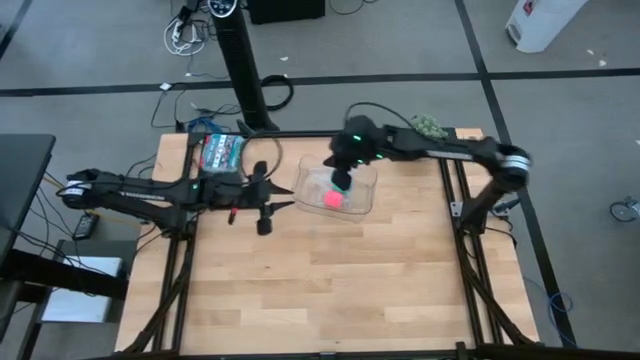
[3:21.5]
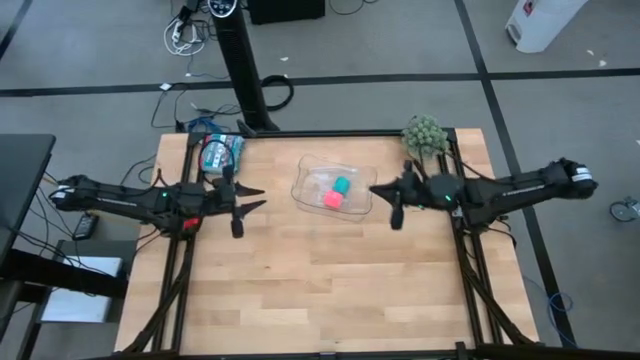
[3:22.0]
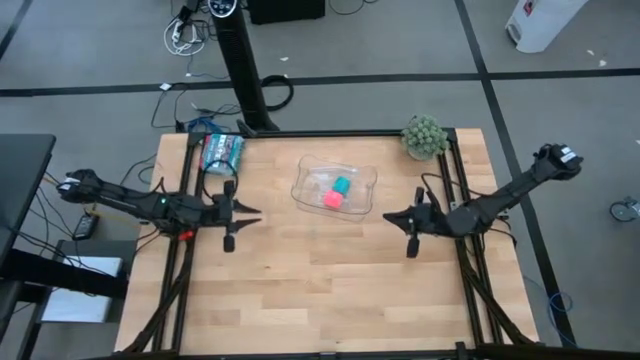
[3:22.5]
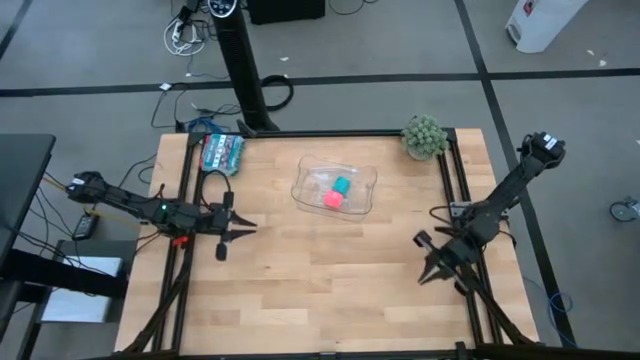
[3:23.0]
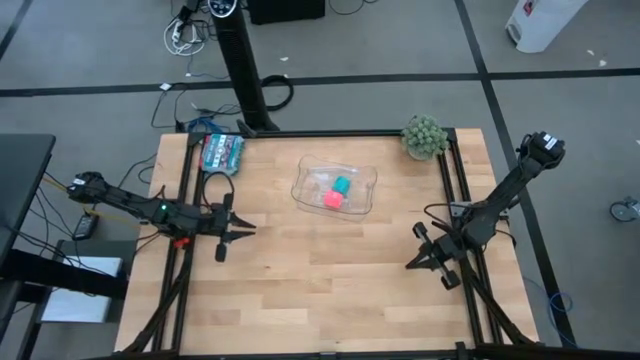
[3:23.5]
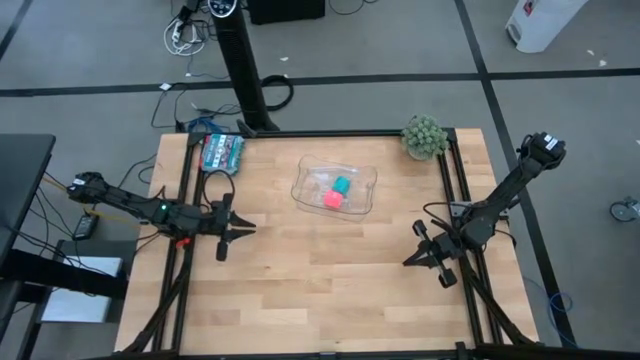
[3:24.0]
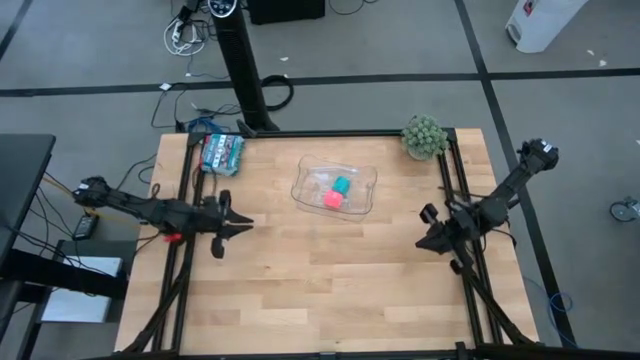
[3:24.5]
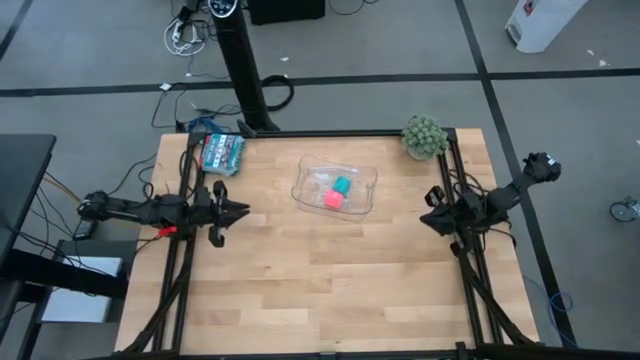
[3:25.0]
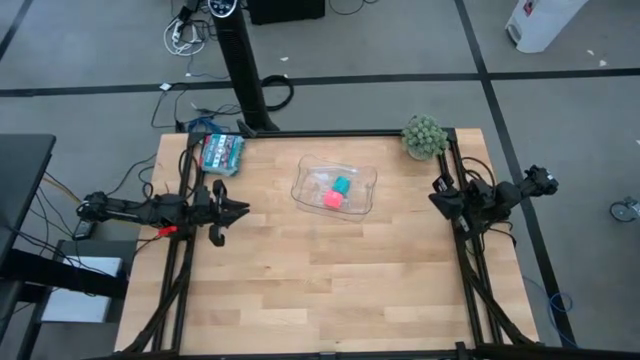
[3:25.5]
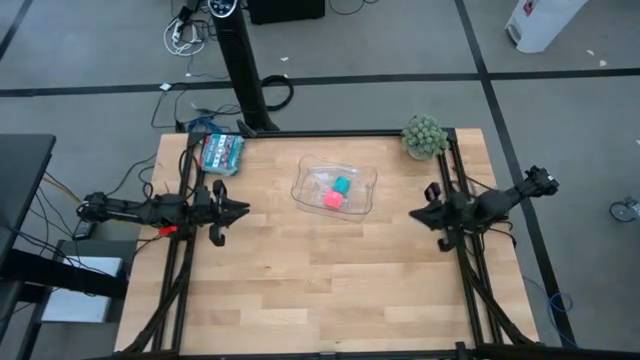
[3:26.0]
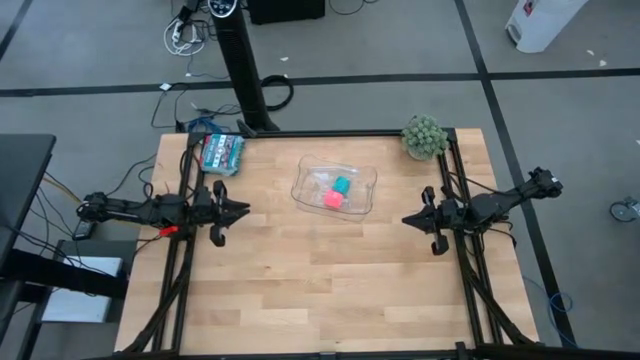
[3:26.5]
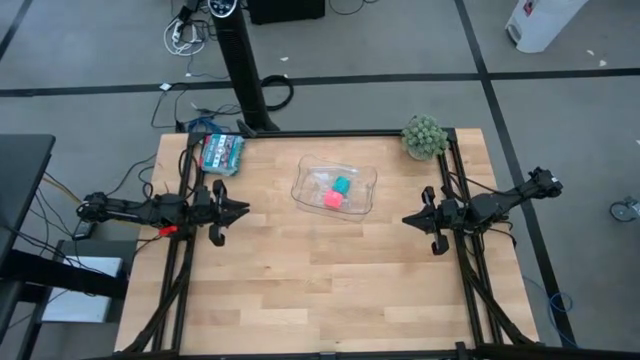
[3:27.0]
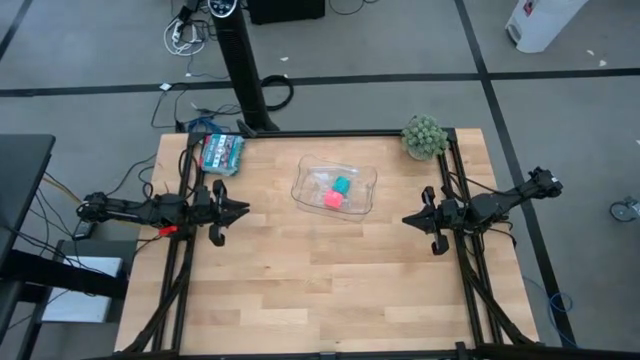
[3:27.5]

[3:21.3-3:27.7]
Task: Roll bandage
Return to Home Position

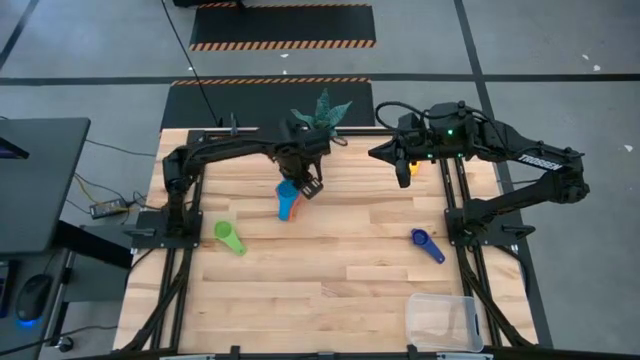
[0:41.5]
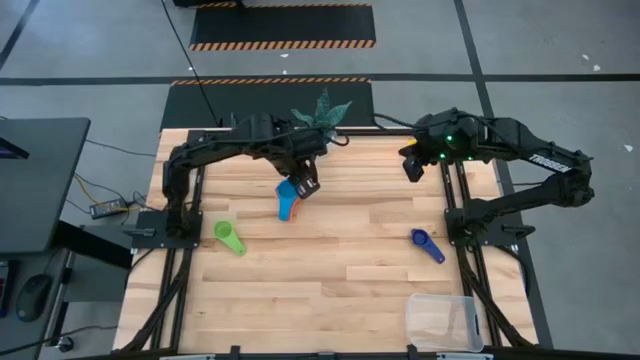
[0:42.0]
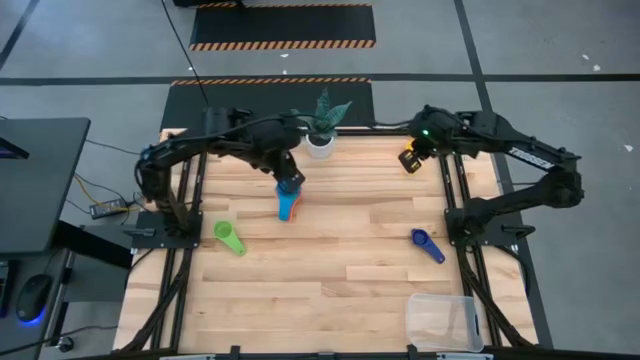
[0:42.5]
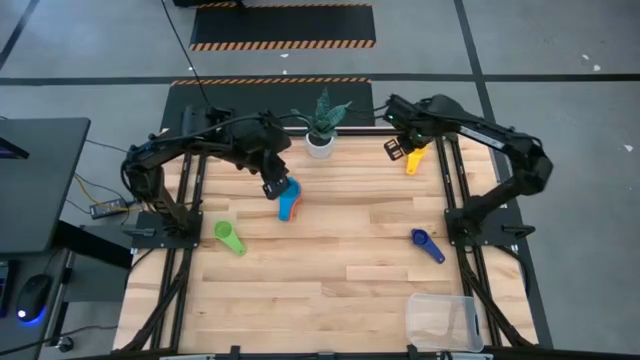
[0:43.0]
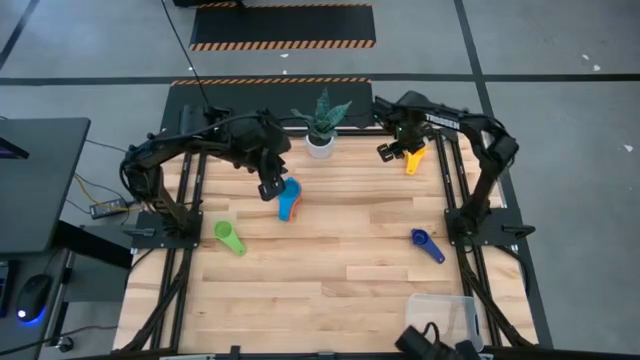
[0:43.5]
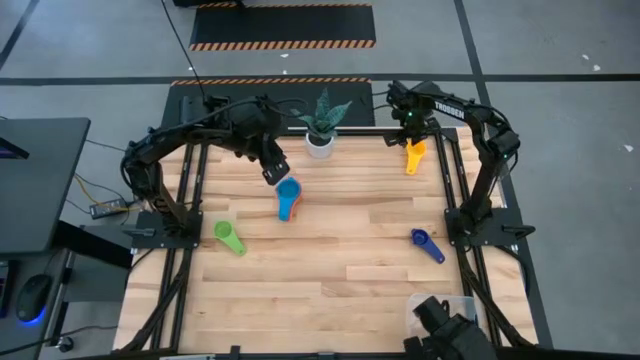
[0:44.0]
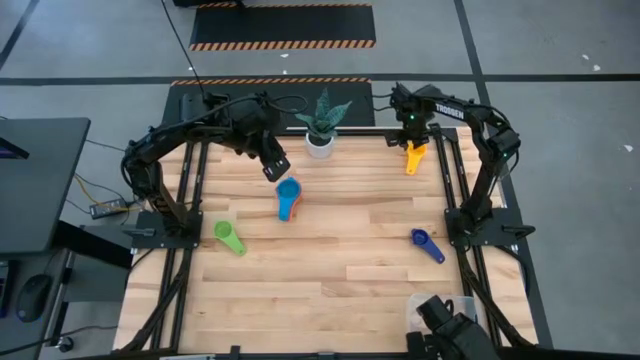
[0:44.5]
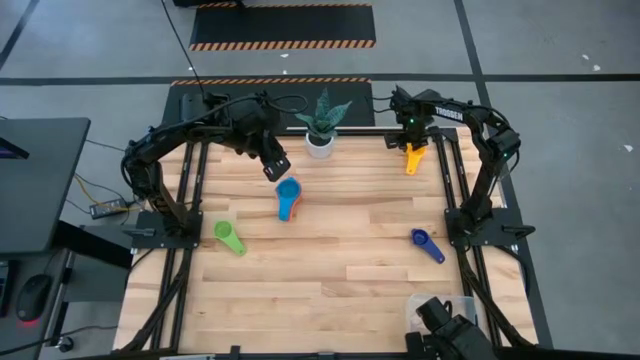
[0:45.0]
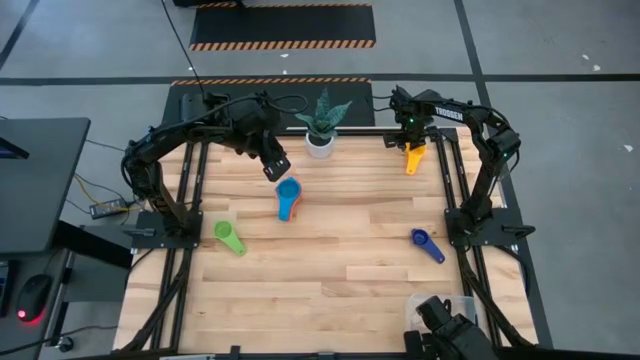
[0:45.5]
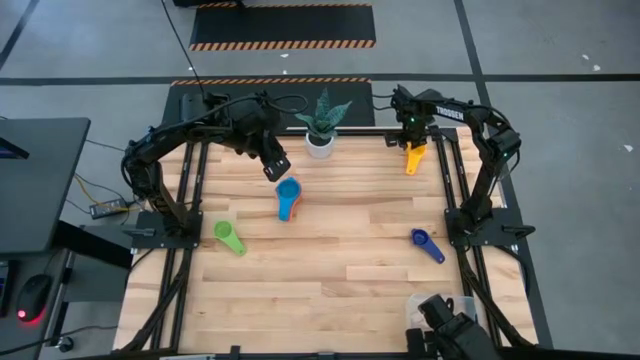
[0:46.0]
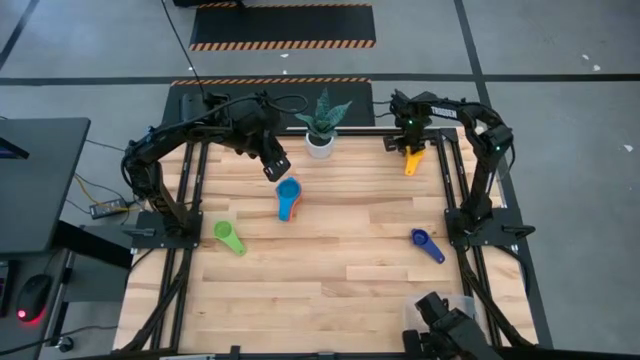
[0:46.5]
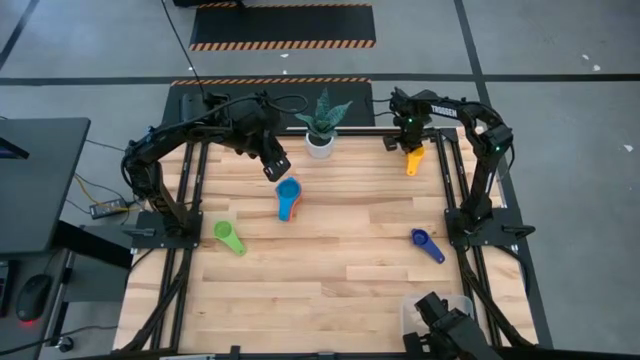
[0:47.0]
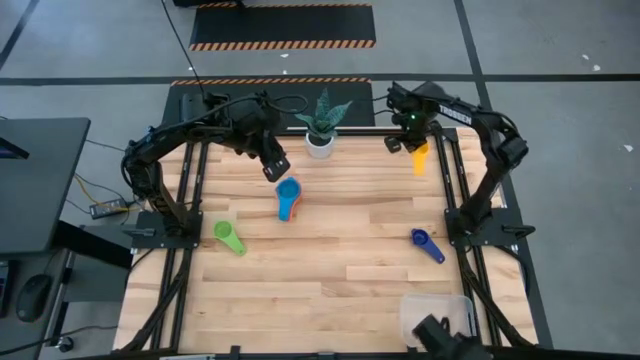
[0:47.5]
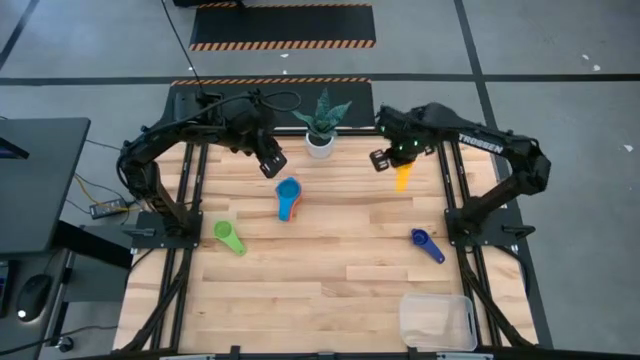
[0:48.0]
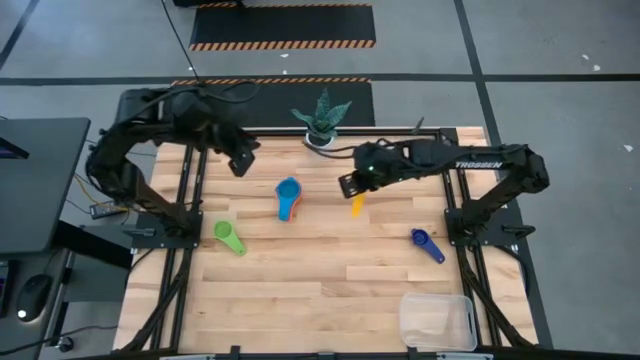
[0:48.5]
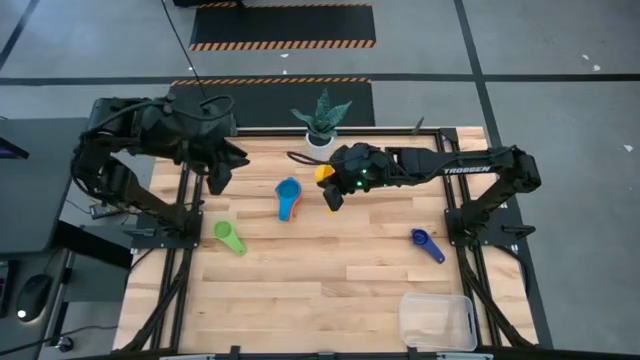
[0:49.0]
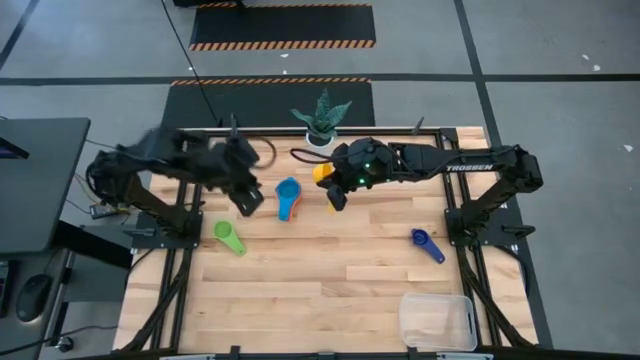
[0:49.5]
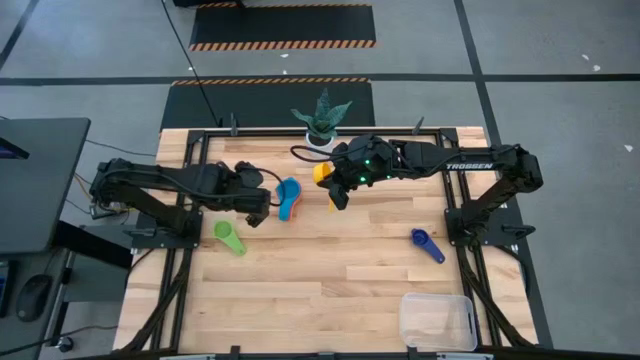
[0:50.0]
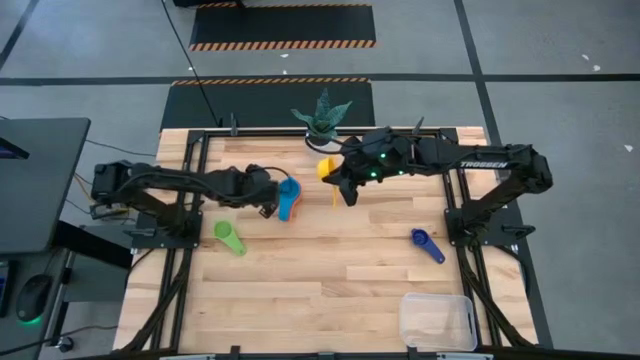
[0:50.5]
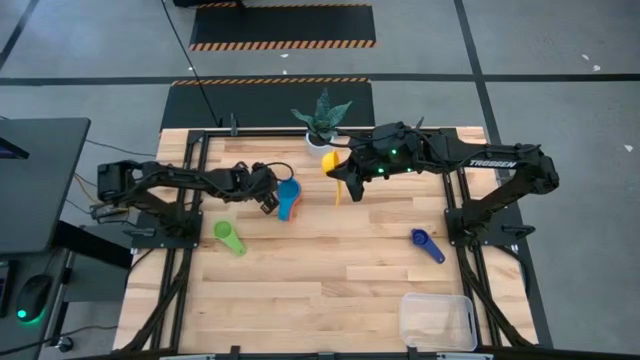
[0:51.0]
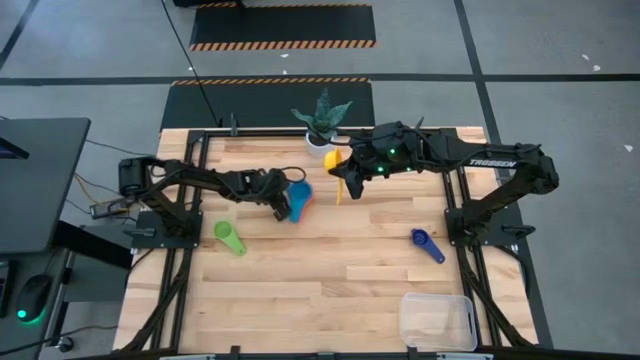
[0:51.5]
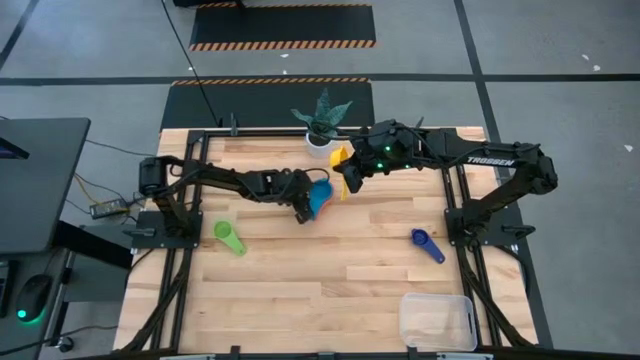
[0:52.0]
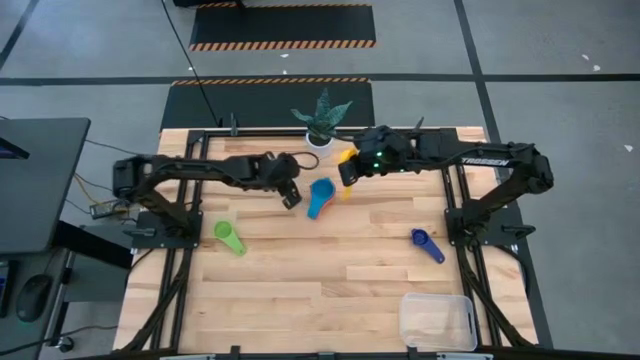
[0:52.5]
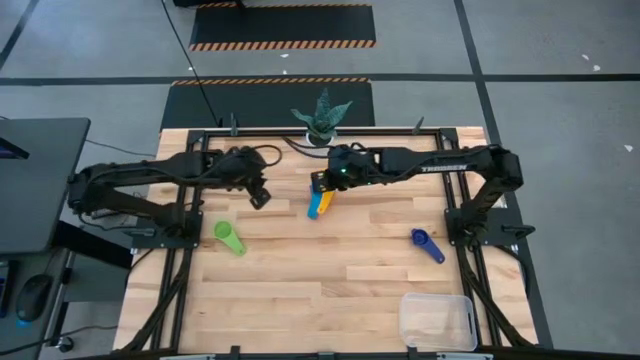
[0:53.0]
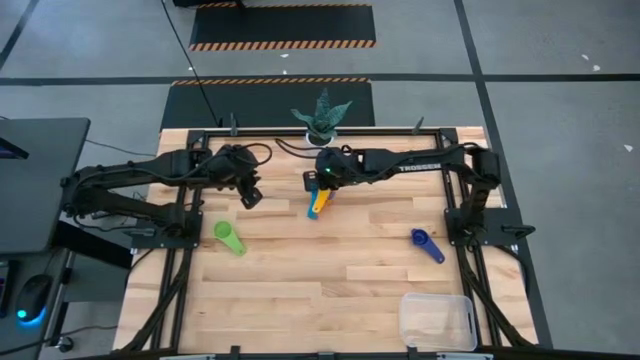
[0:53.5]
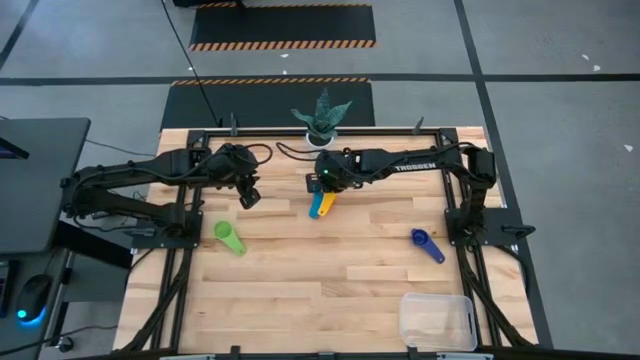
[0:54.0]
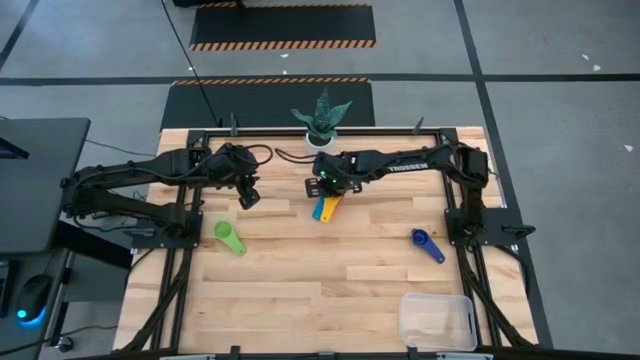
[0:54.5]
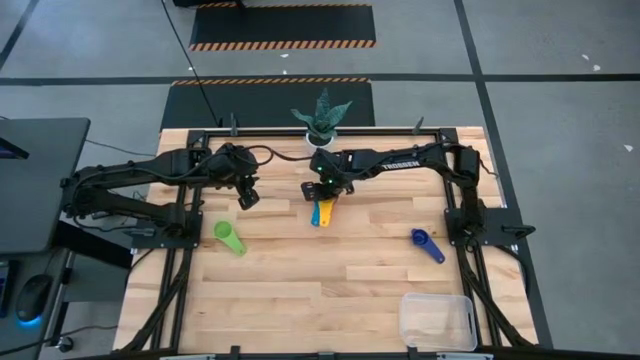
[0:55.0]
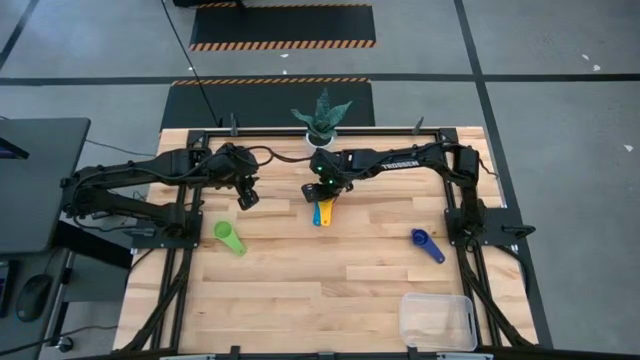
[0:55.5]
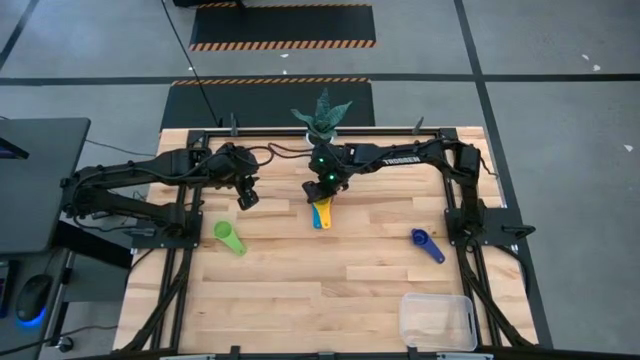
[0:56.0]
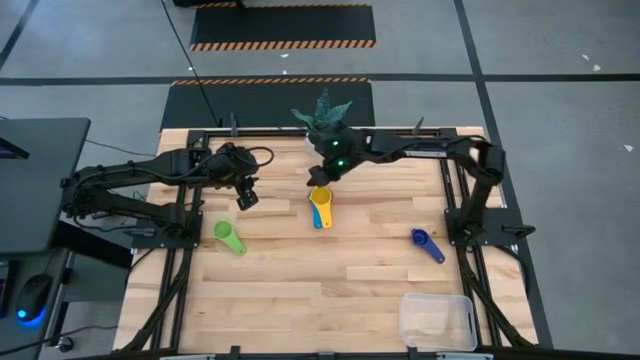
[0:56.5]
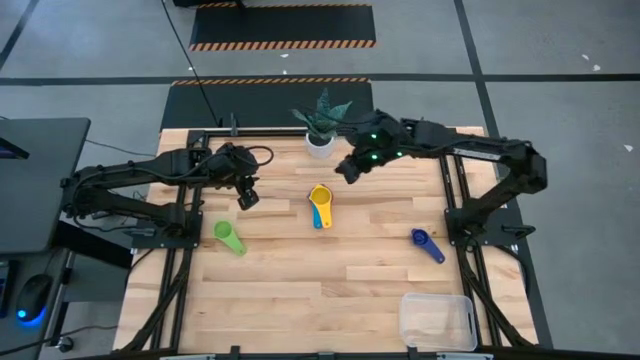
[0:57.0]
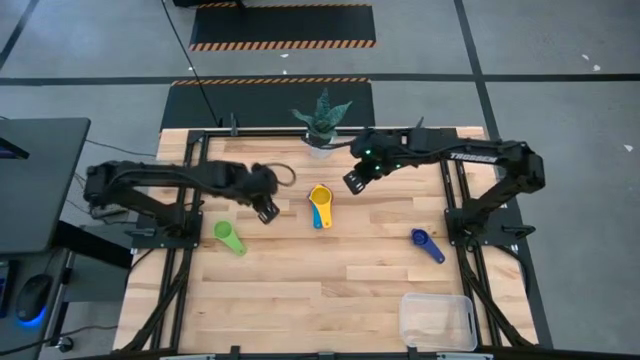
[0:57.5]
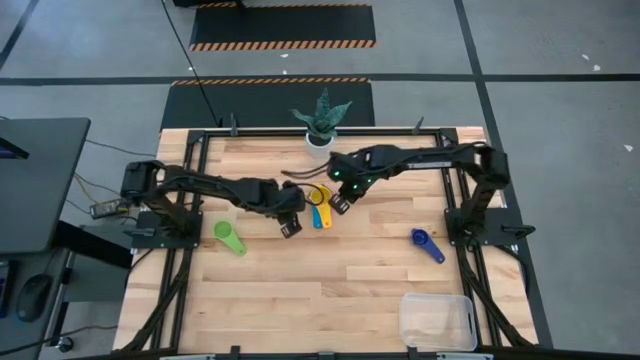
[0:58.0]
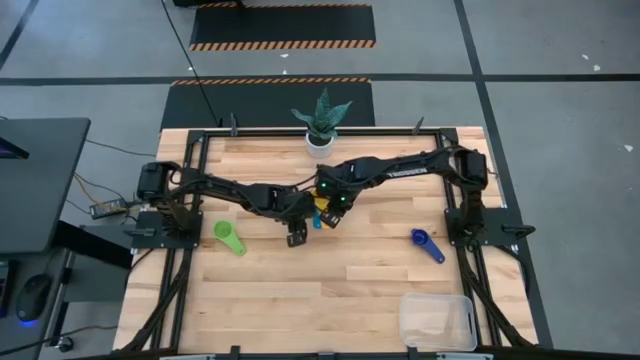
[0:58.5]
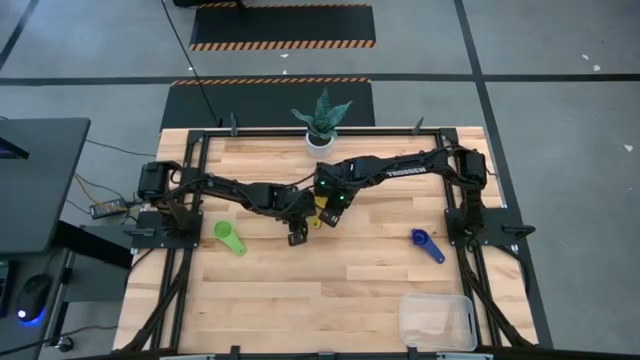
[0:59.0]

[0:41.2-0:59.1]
Task: Nest measuring cups in basket
Stack the yellow measuring cup on top of the light blue measuring cup
